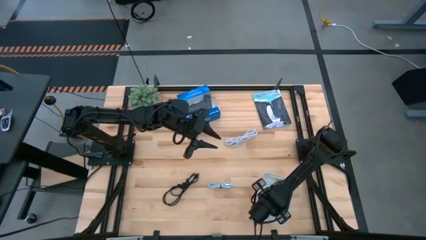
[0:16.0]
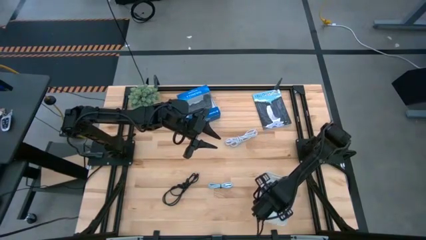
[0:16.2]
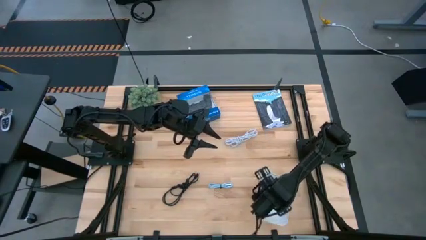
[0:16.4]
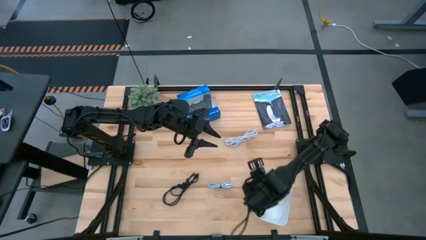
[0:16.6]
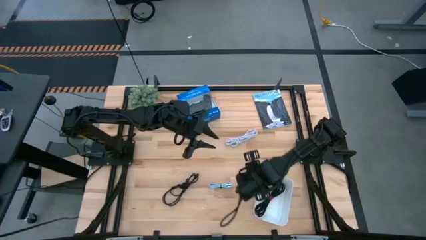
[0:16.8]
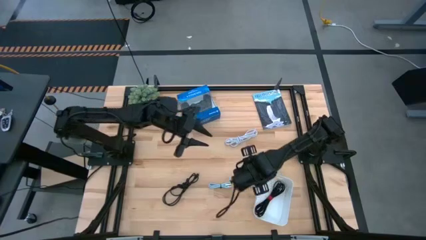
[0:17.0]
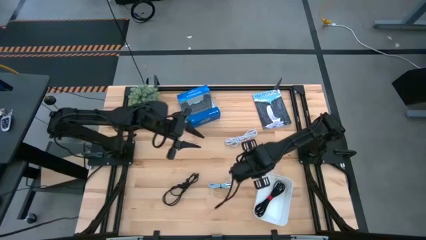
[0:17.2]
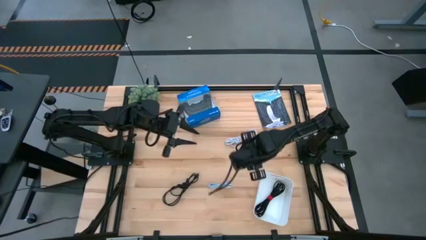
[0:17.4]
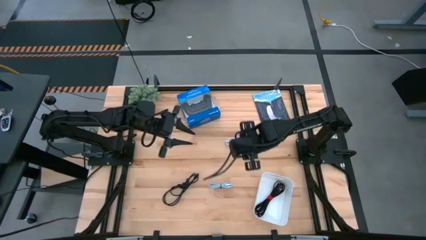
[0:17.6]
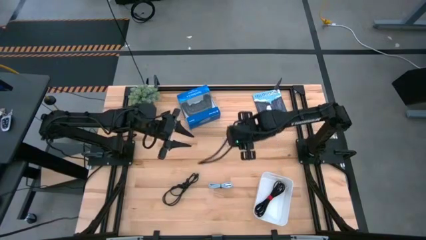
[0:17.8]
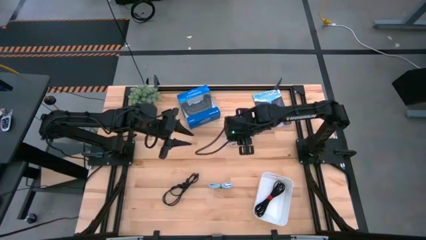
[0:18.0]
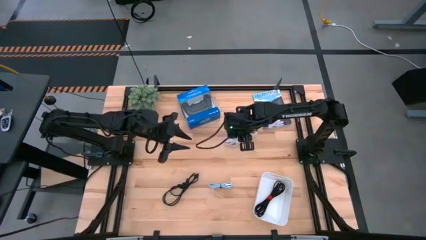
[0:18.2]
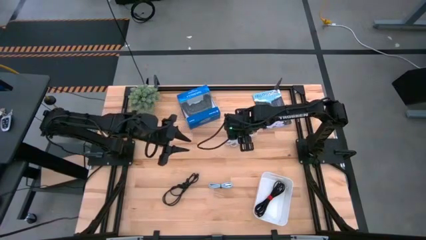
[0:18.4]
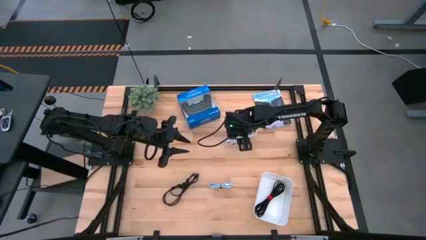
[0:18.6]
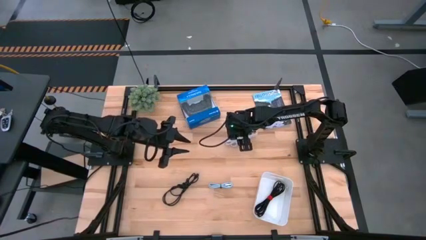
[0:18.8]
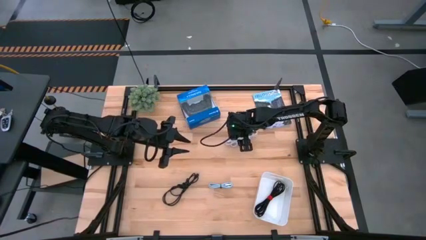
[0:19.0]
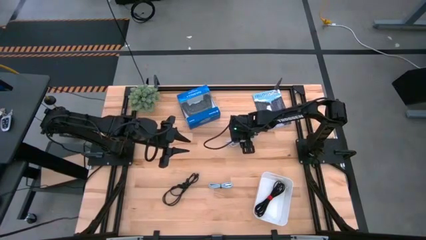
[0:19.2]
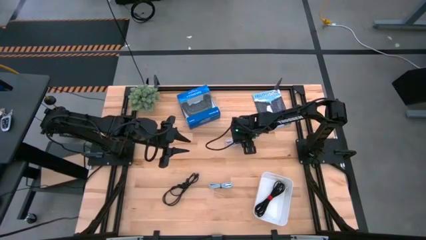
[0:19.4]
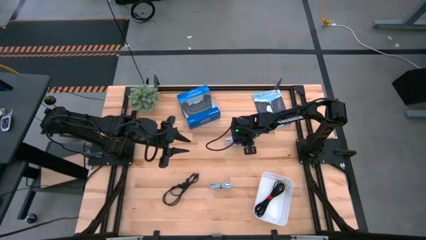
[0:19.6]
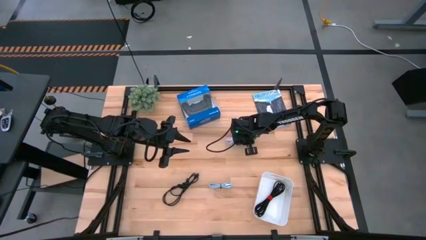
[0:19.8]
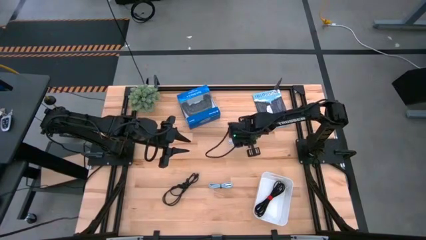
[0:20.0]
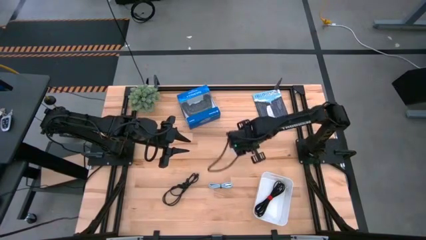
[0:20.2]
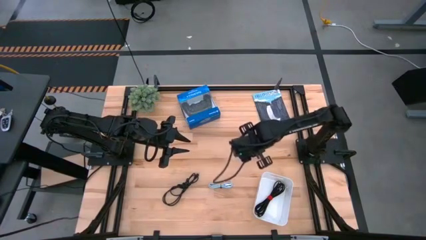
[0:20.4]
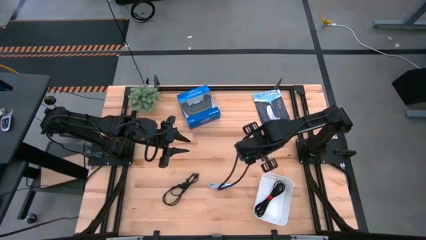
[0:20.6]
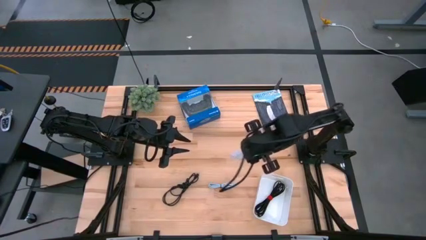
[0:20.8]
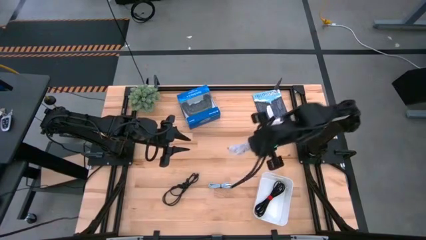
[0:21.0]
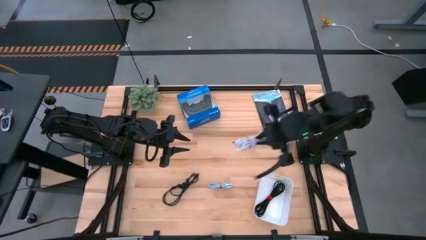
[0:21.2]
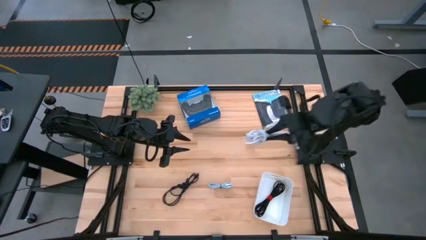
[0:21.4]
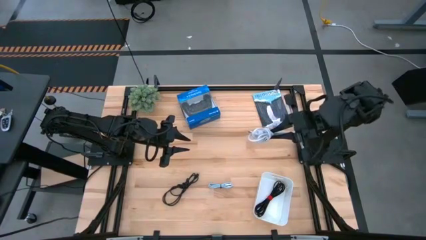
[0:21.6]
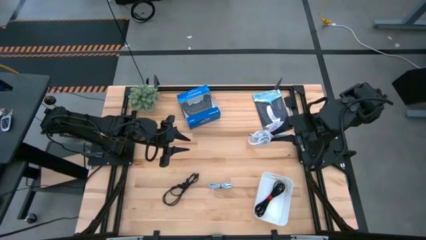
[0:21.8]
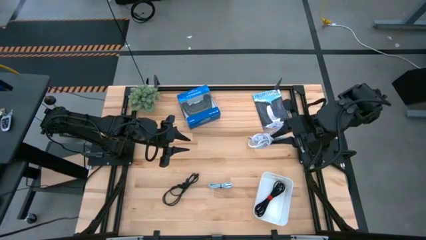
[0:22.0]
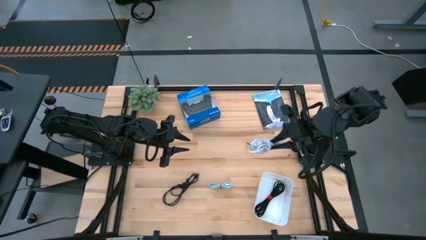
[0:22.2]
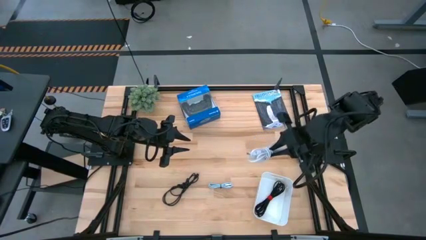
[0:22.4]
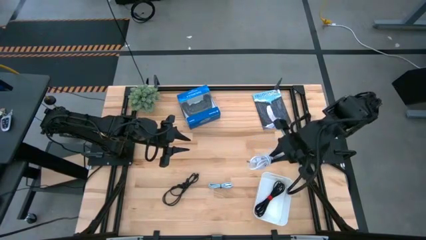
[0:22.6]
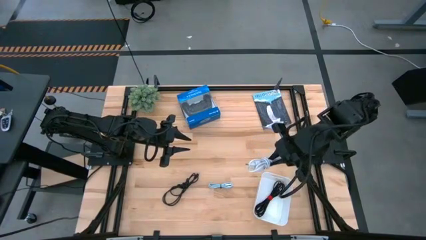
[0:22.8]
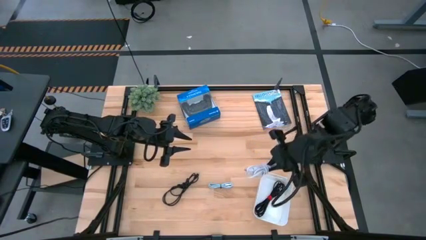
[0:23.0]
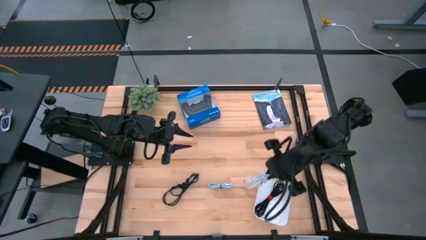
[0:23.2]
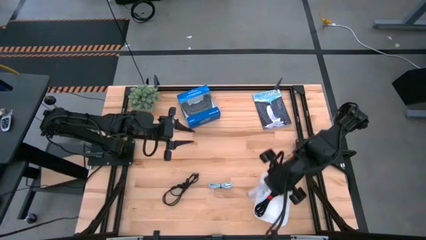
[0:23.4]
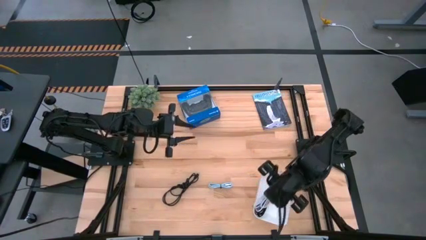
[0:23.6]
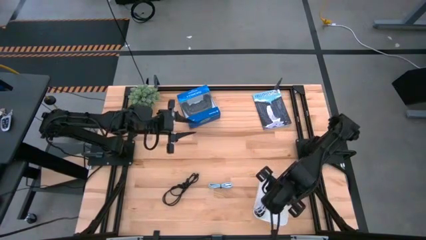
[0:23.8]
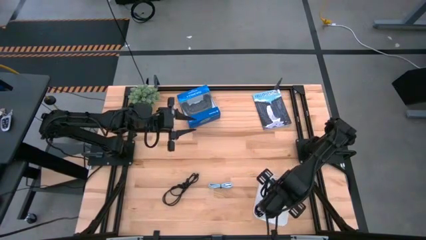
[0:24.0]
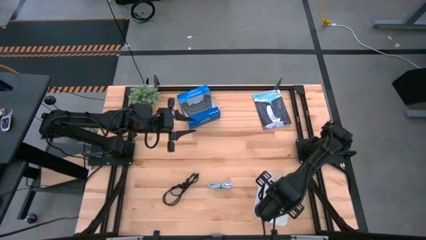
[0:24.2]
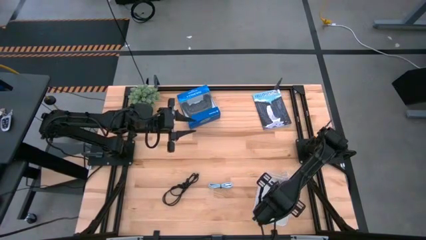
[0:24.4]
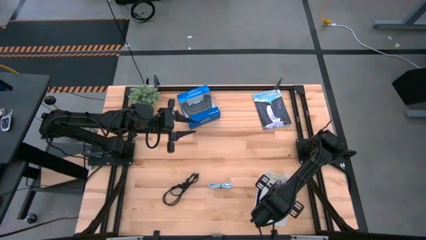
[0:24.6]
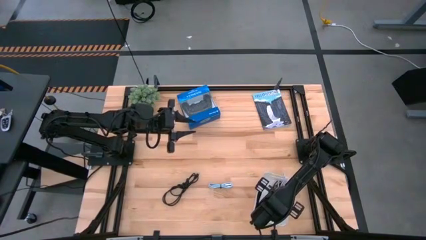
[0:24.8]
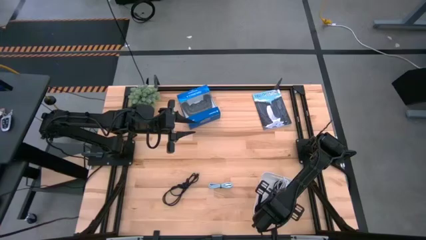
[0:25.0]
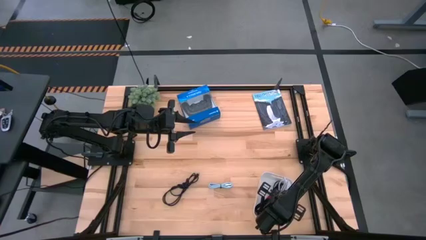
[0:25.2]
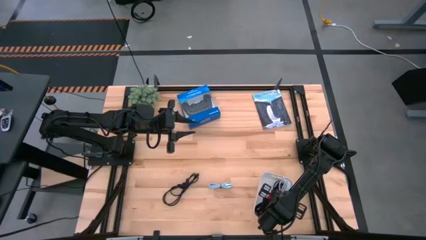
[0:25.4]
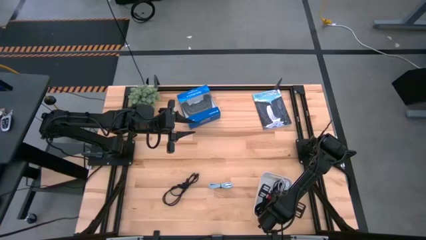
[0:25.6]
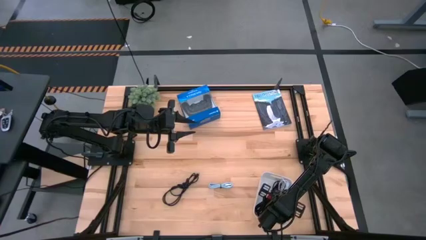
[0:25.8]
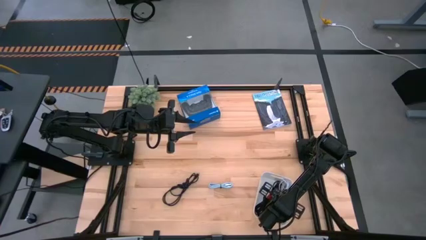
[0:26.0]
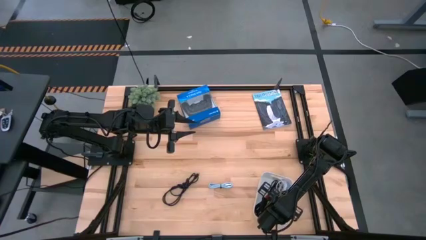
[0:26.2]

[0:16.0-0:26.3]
Task: Pick and place USB-C Cables
Put the white charger cable into the white bin

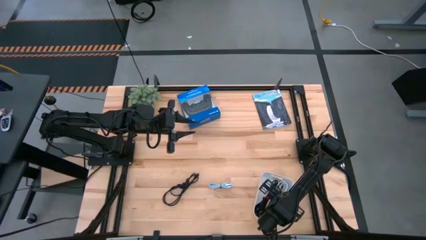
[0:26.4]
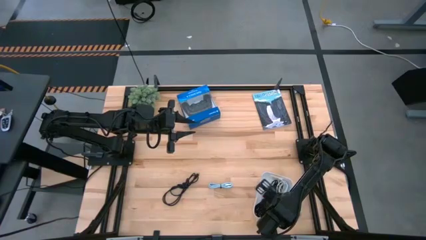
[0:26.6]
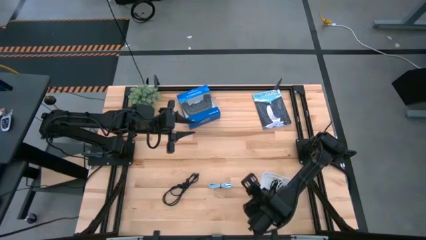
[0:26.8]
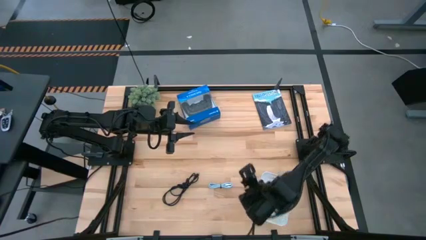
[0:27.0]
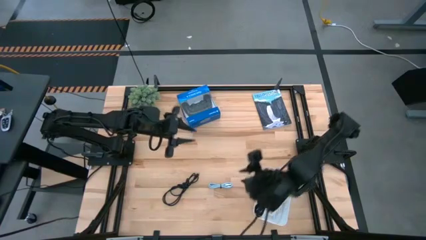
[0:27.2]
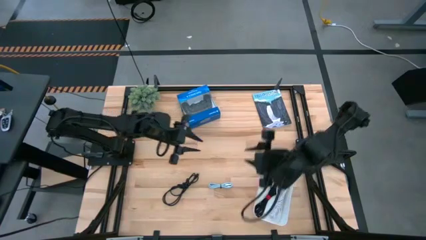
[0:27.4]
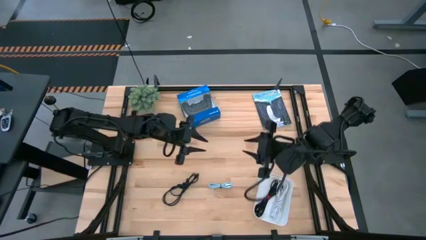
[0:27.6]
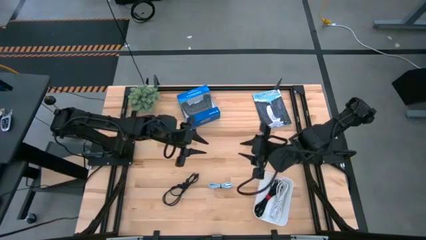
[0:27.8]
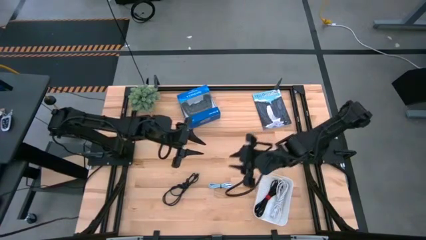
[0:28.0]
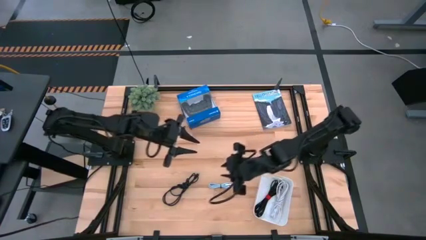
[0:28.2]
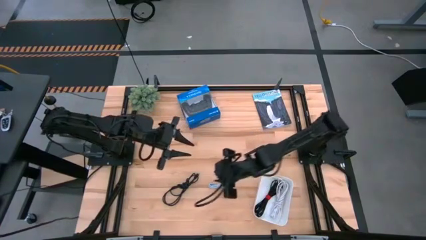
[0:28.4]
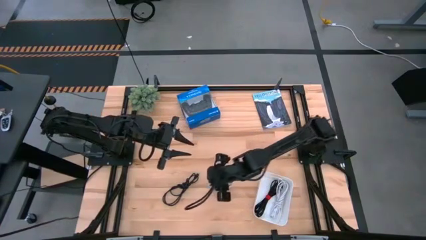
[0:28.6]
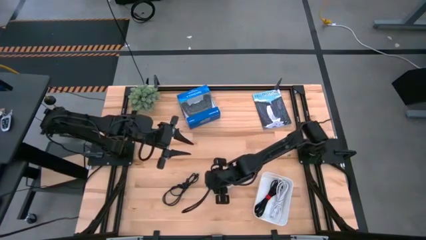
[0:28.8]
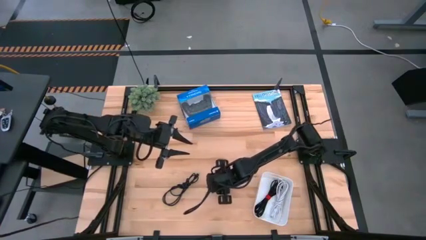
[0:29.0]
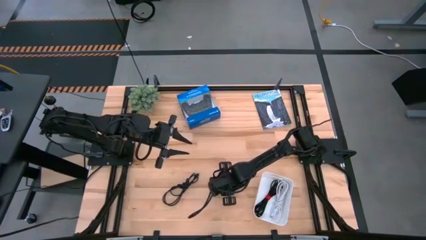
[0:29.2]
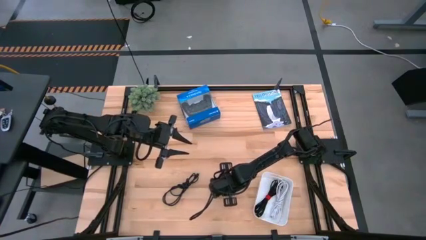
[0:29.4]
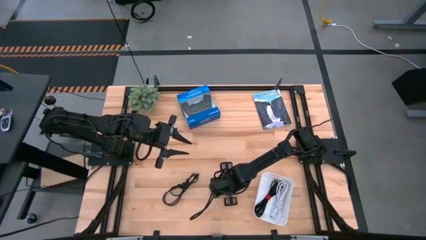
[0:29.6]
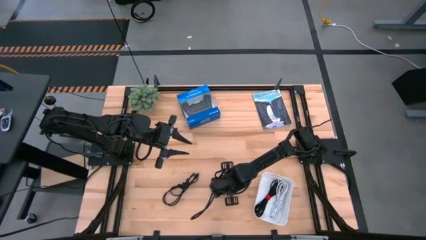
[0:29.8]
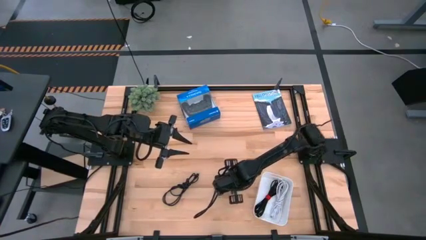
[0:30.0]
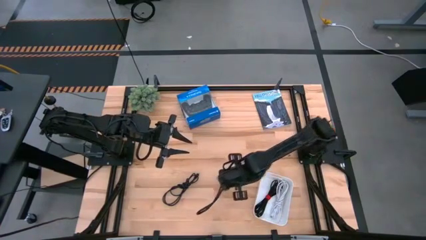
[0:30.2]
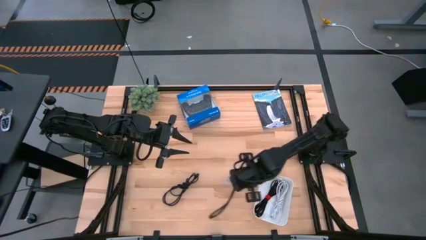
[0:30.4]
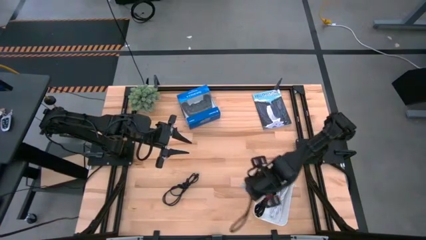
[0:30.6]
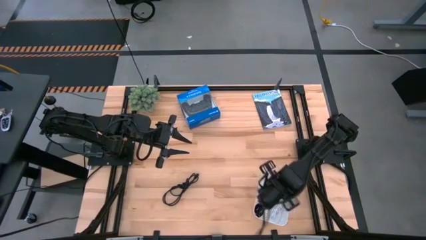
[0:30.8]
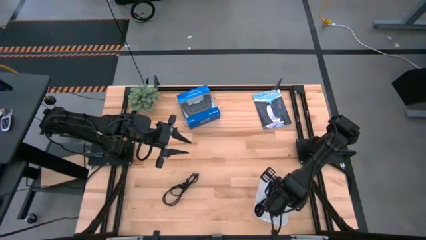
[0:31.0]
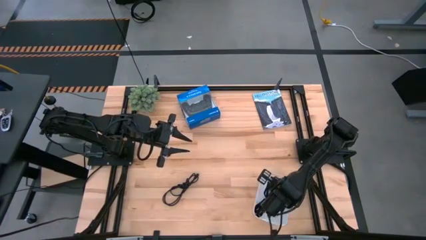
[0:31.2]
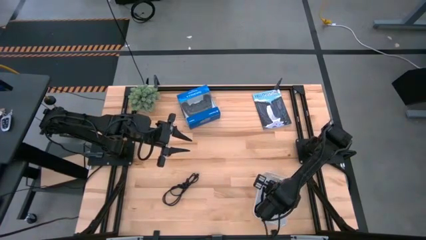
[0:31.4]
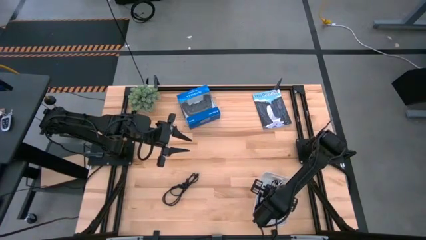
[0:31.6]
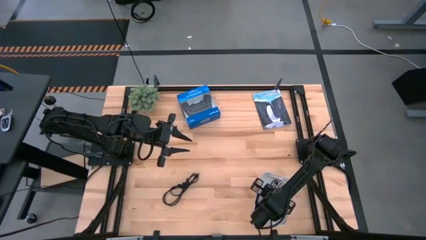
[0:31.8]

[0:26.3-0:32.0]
Put the blue charger cable into the white bin
